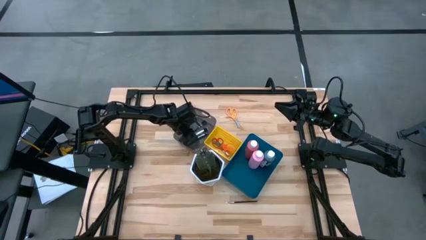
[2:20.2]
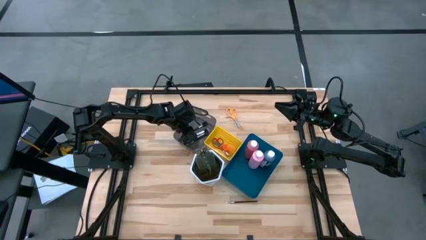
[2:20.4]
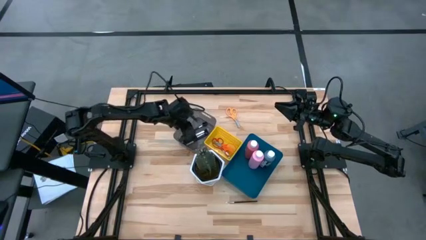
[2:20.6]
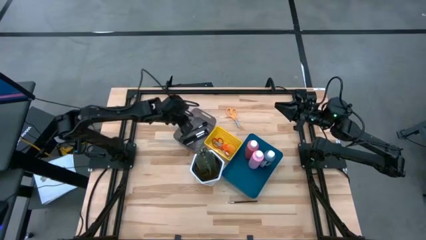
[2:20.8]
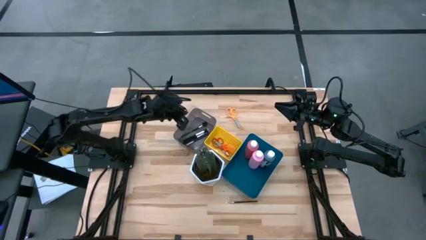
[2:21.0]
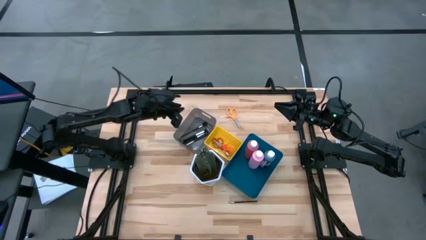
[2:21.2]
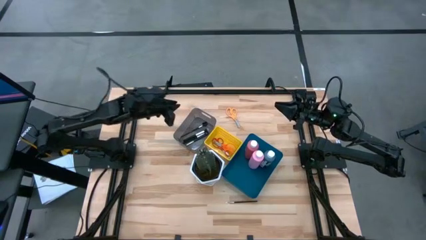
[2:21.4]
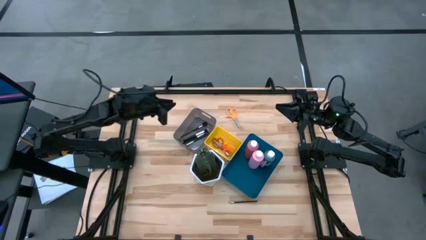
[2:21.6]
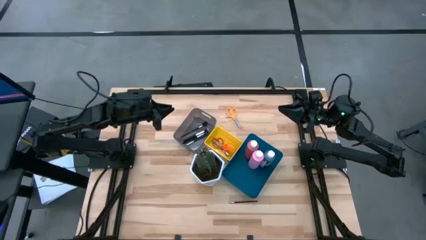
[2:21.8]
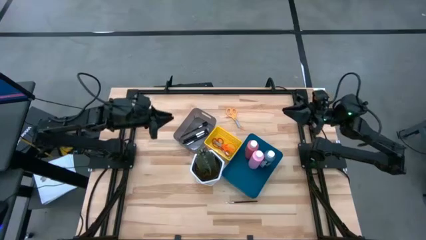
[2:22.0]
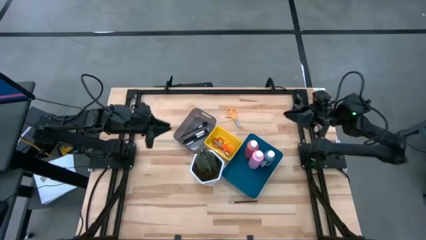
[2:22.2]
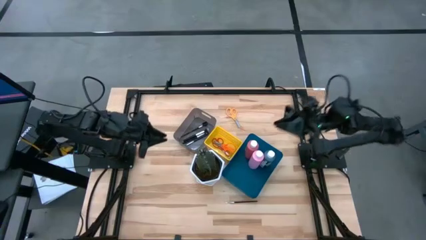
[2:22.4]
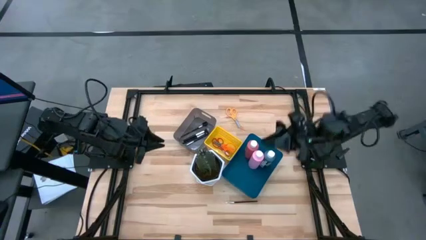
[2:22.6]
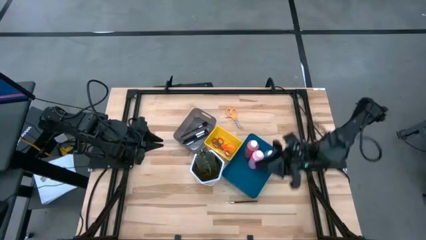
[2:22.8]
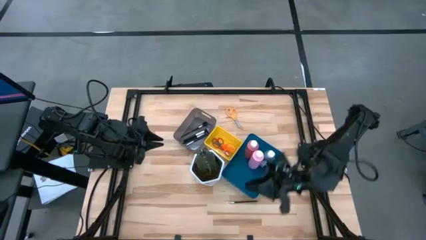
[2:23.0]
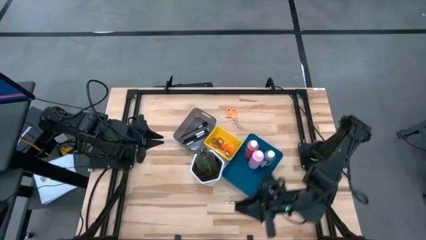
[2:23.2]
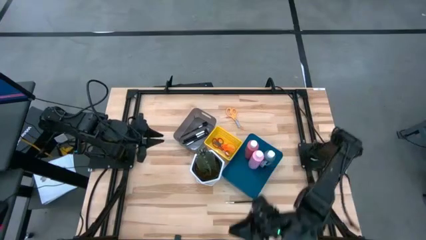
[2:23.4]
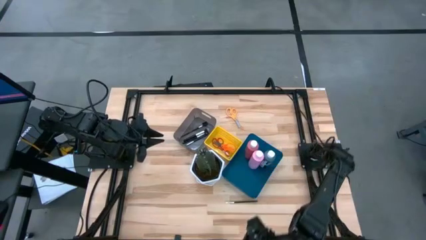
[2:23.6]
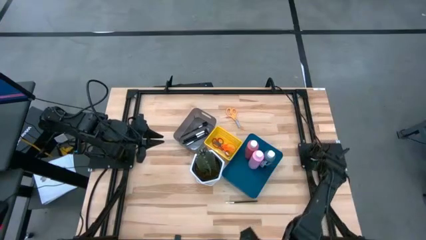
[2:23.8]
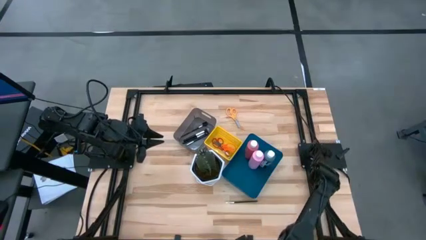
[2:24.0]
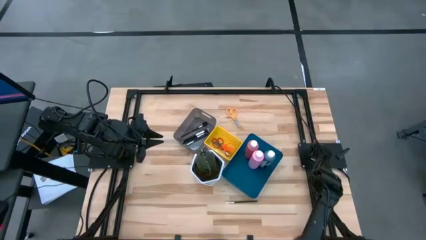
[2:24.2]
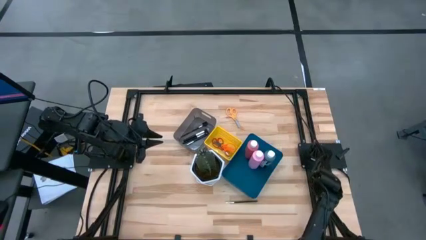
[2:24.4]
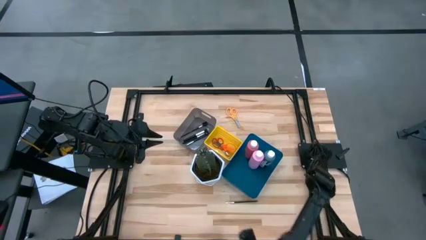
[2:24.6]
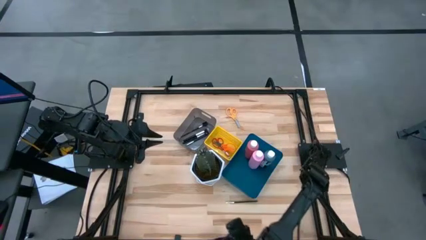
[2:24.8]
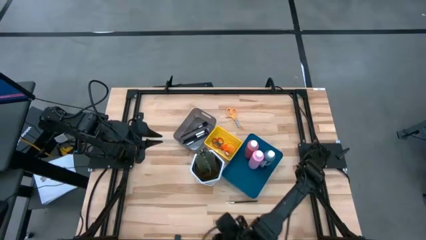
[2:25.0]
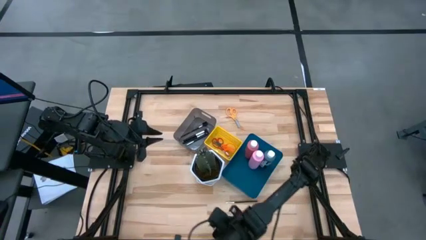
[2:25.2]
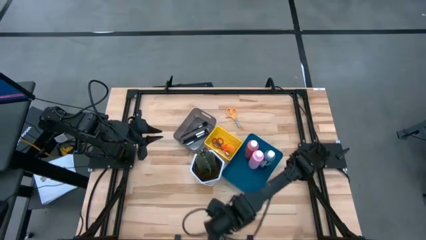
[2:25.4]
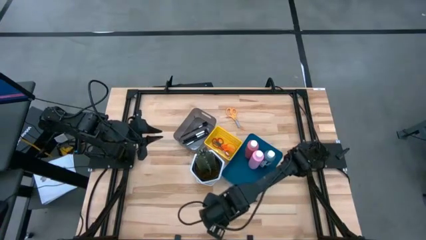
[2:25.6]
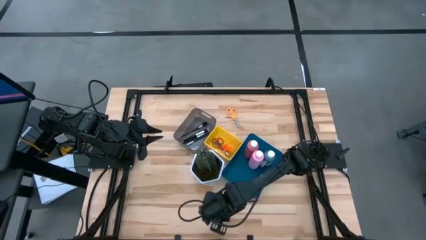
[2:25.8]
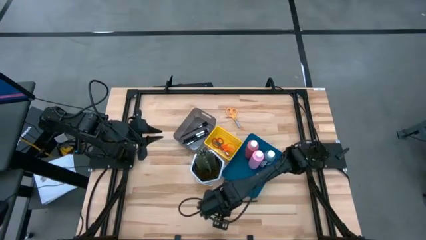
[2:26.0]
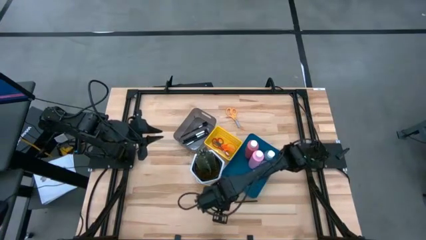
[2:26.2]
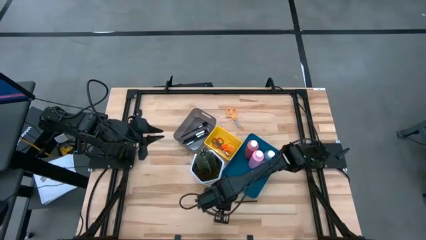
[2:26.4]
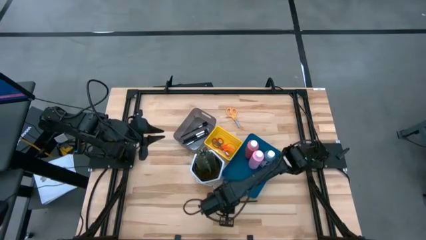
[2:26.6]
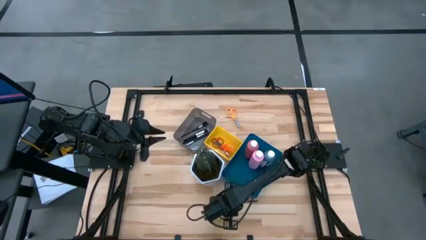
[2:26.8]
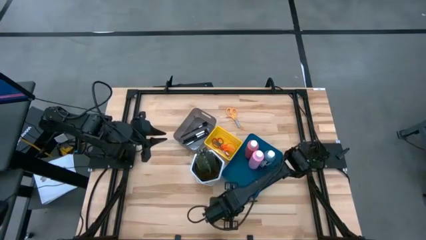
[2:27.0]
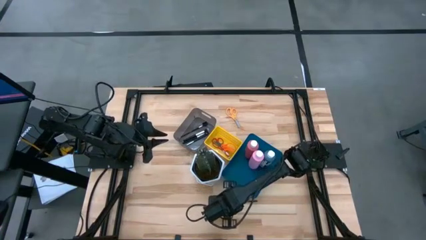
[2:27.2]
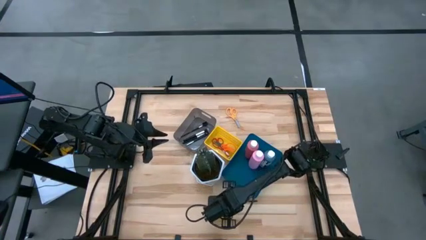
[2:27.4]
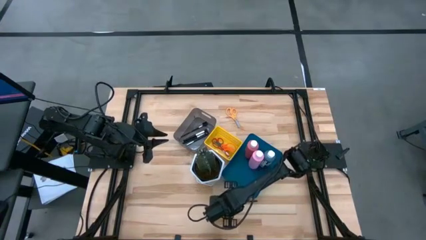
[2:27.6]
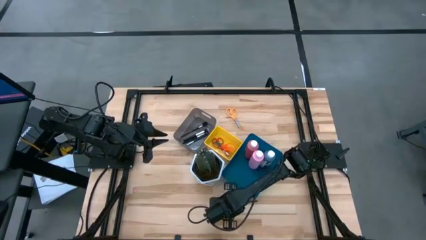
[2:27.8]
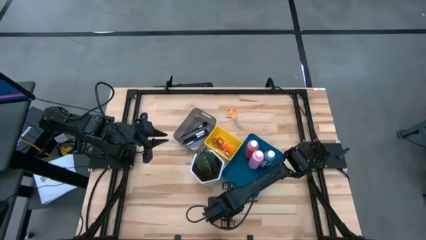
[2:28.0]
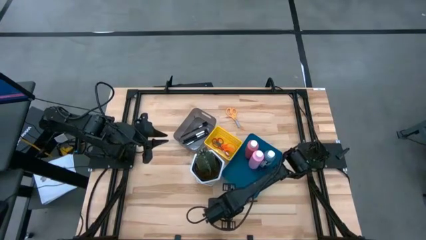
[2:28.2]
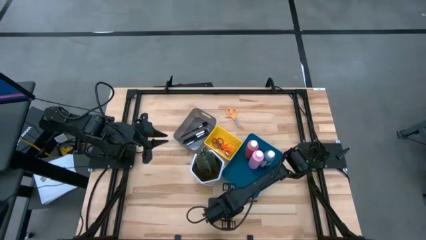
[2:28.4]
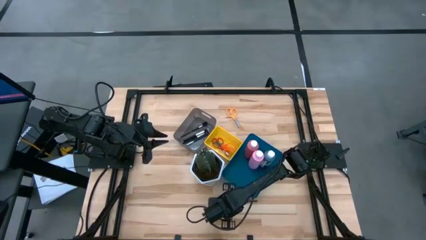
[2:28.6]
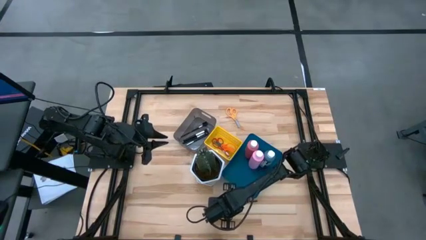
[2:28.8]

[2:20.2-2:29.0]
Task: Pick & Place Paint Supplies
Put the makeup brush into the black bin

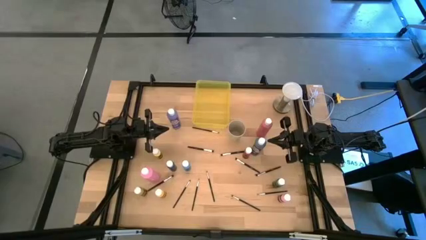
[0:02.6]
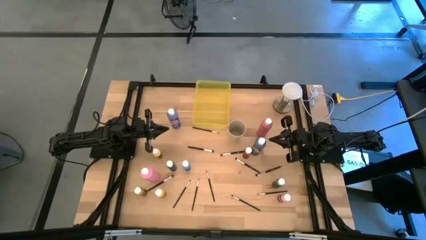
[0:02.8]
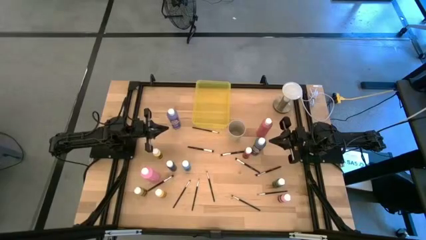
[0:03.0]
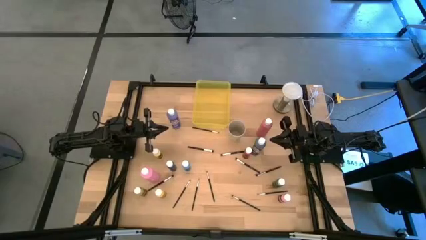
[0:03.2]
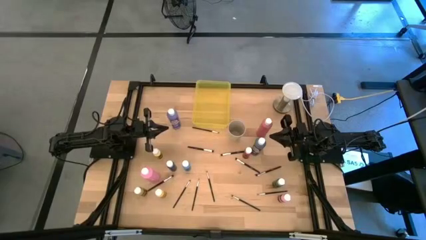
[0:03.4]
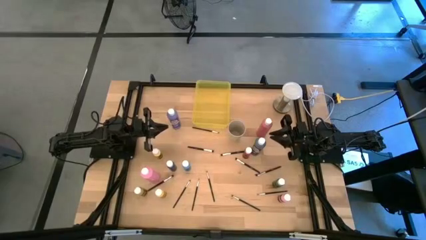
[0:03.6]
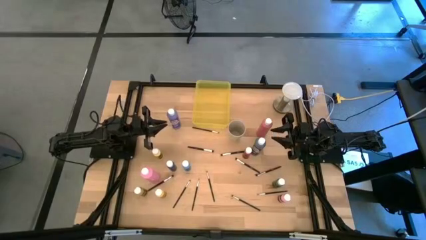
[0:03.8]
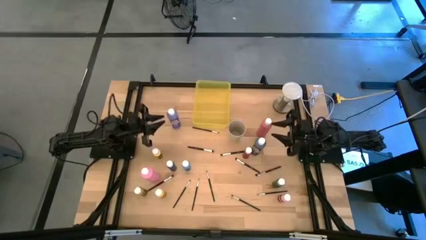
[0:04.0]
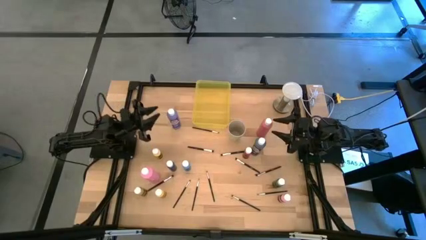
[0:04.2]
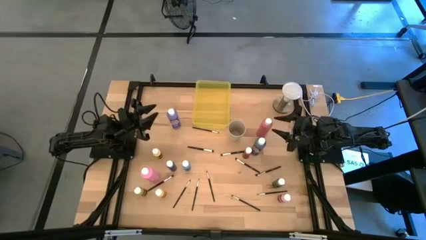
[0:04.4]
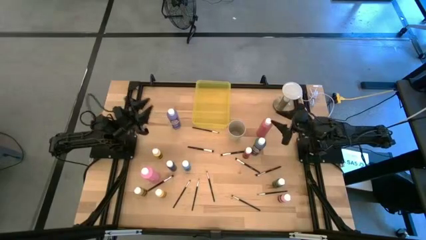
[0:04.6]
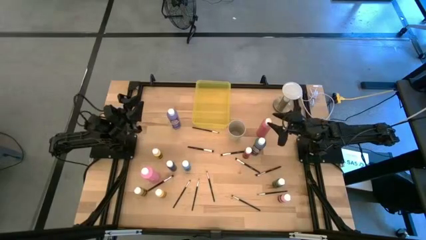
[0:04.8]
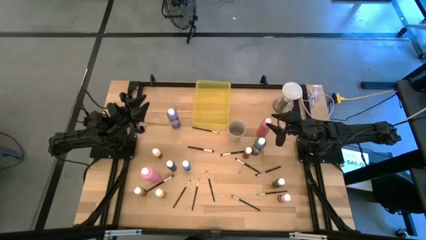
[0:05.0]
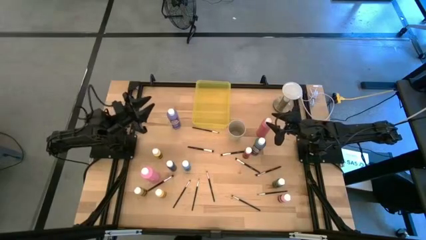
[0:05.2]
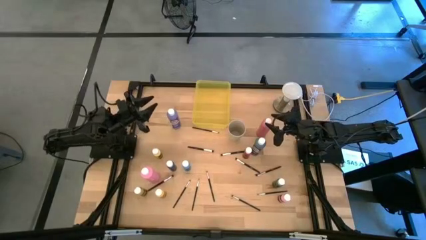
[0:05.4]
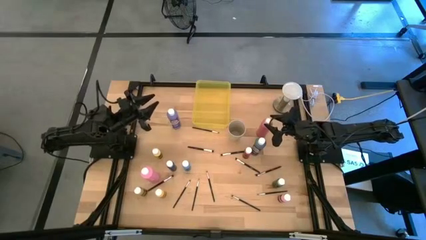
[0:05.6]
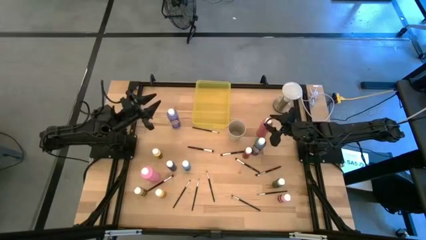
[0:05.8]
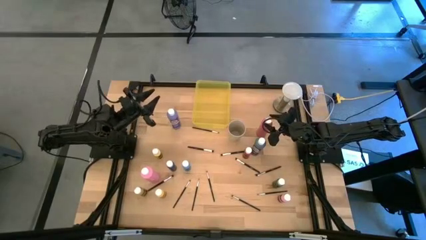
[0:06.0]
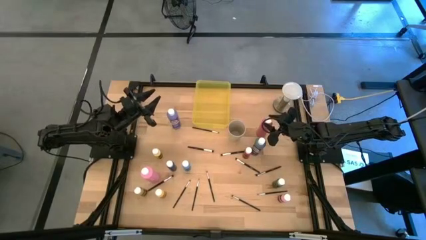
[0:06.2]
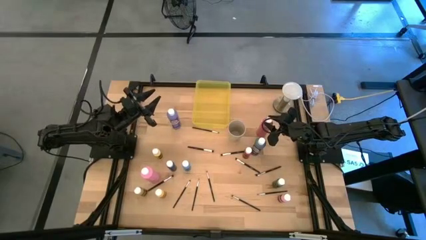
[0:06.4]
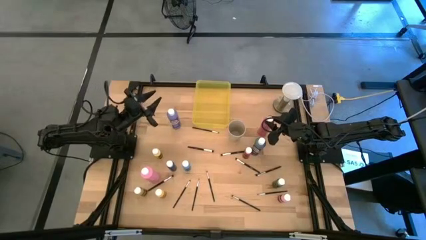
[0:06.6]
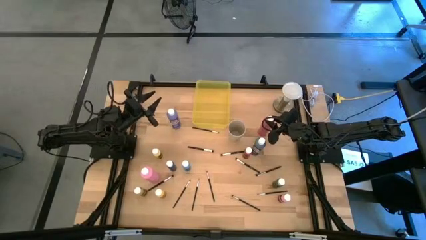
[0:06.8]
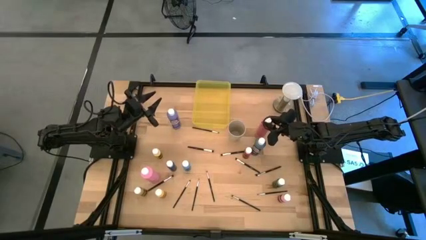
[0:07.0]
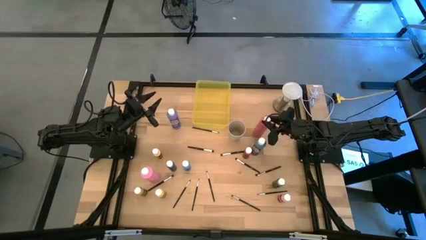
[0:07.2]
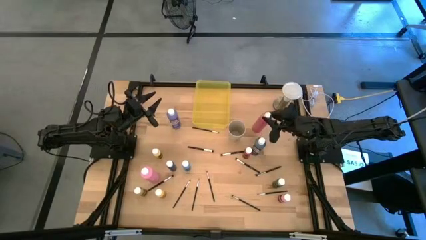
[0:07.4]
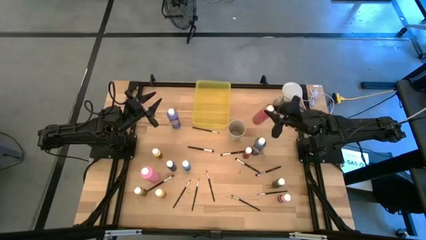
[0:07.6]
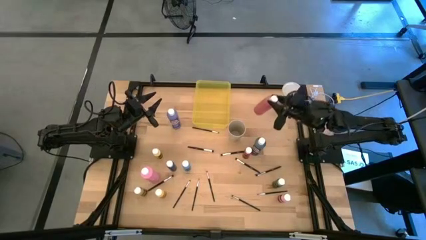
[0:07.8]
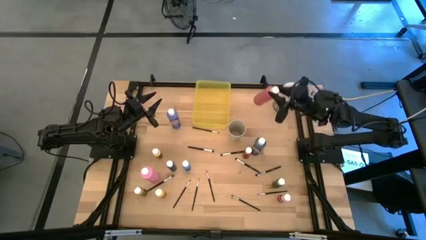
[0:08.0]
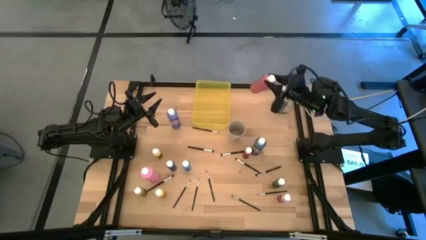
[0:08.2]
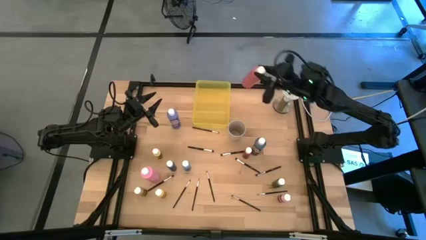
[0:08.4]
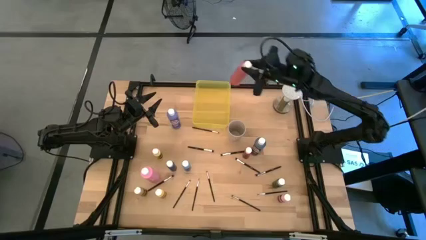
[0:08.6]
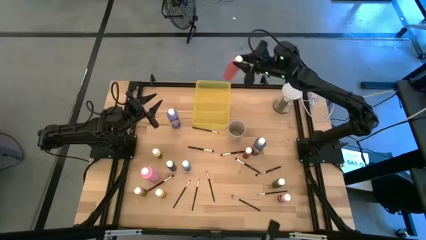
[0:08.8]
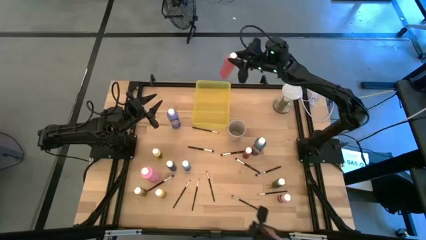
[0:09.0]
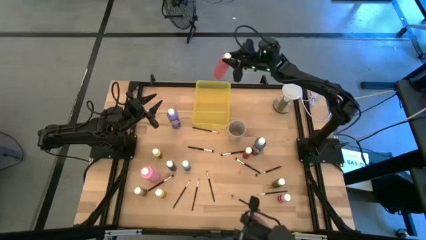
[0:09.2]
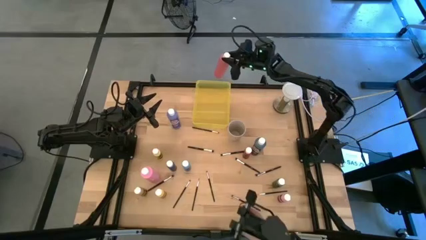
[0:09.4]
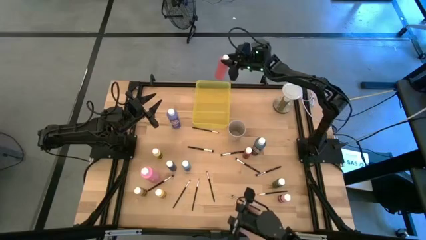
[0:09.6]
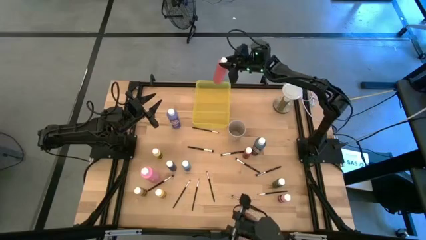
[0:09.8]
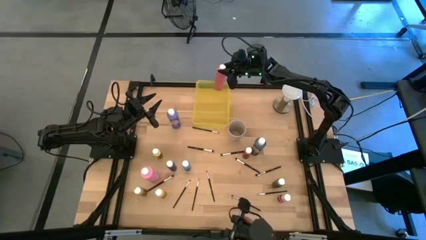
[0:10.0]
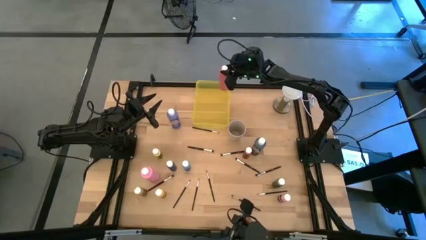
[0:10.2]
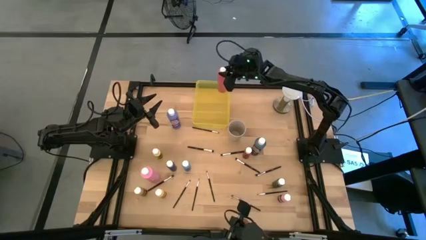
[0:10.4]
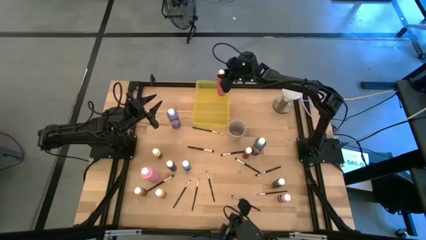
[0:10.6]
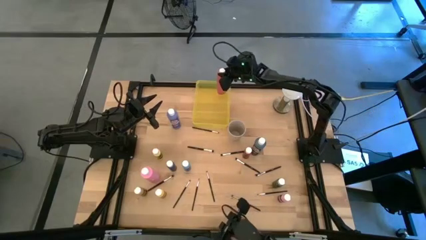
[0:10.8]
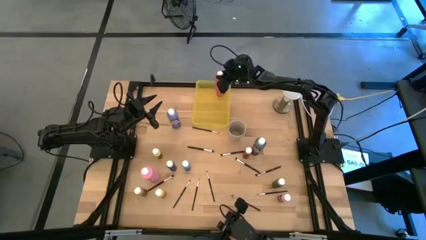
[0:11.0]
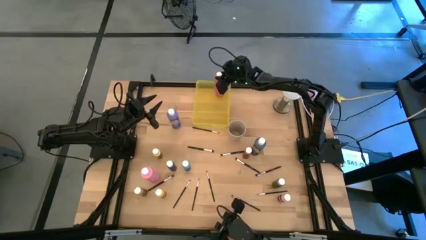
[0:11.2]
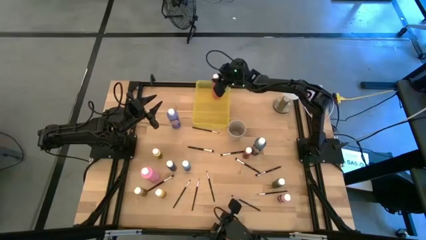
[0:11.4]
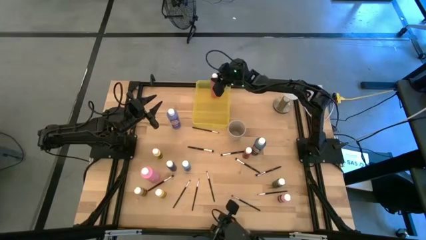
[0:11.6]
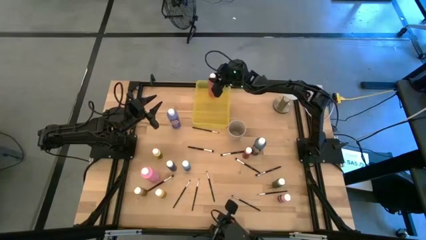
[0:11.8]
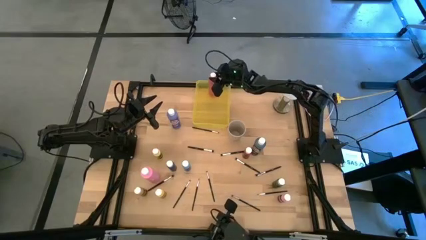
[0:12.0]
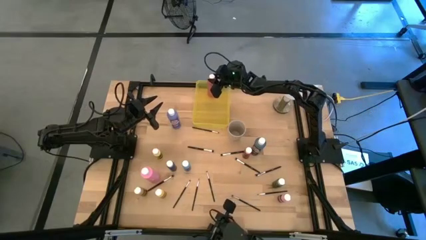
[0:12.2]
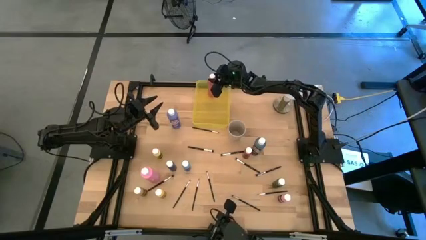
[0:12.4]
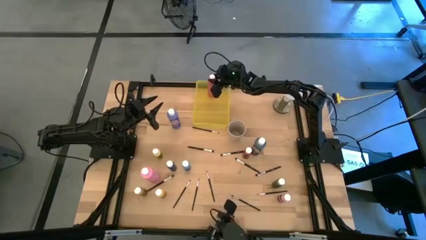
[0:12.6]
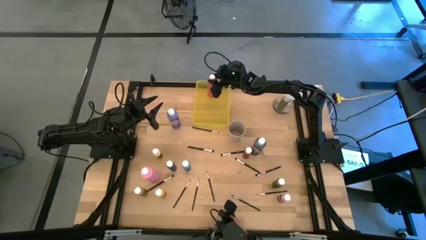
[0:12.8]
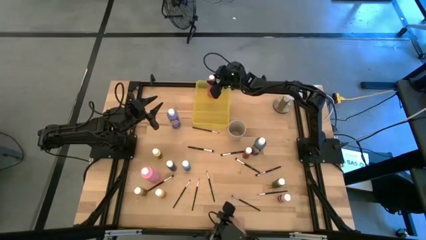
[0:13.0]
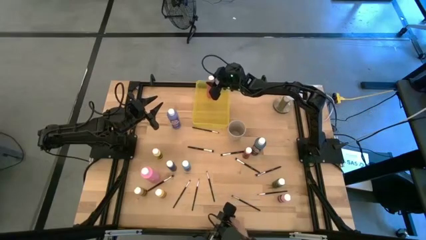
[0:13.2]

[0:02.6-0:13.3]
Task: Pick & Place Paint Supplies
Put the large pink paint bottle into the yellow bin
